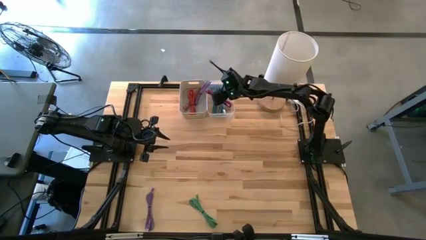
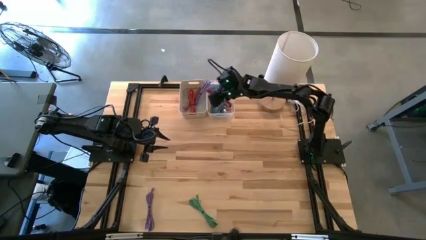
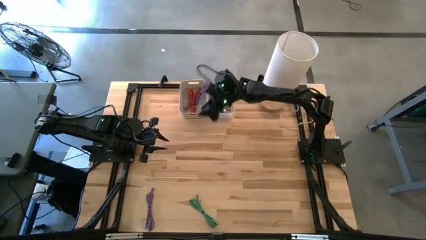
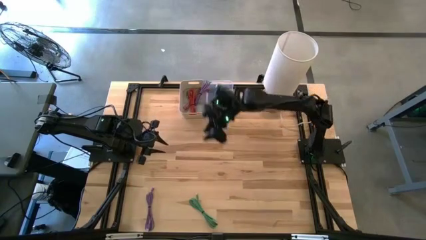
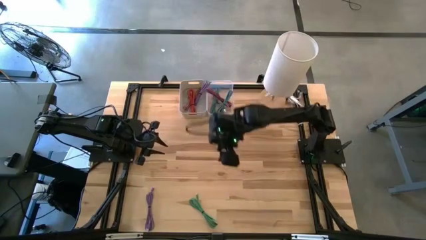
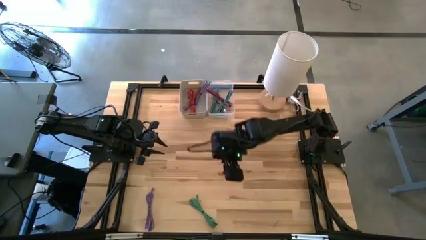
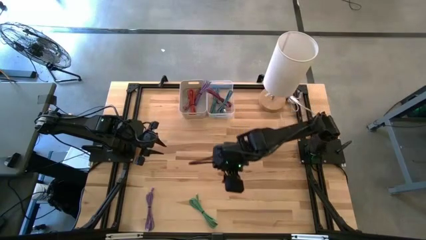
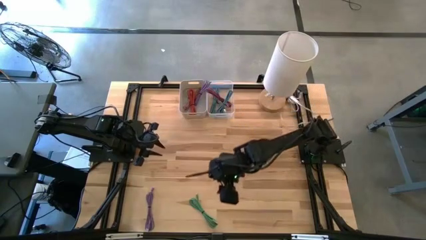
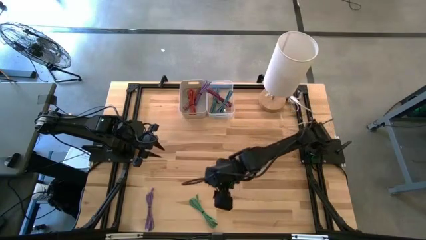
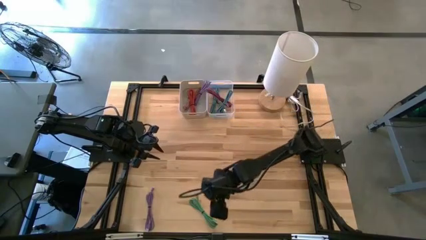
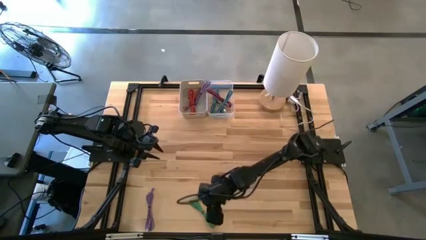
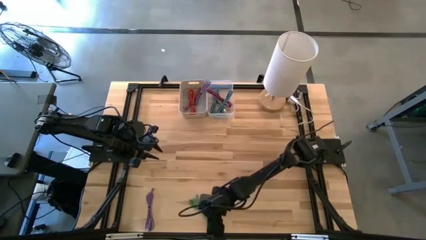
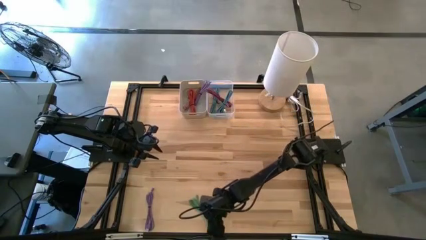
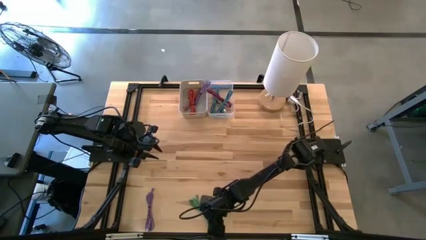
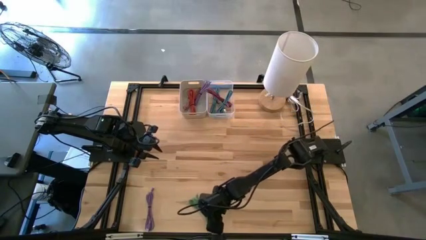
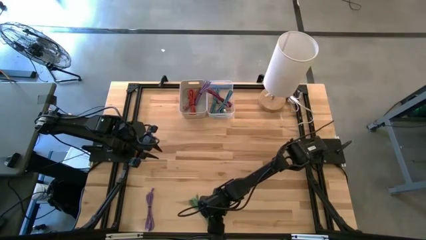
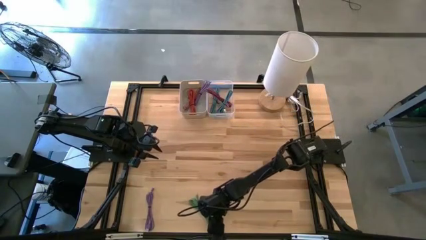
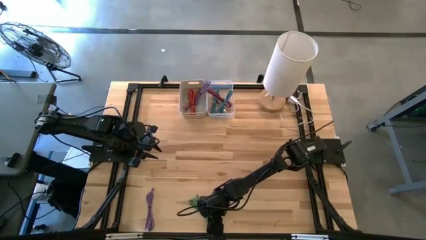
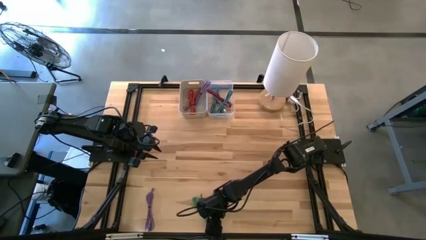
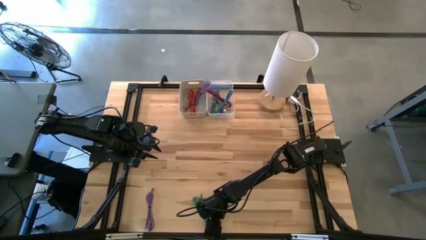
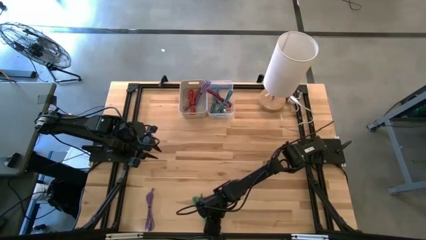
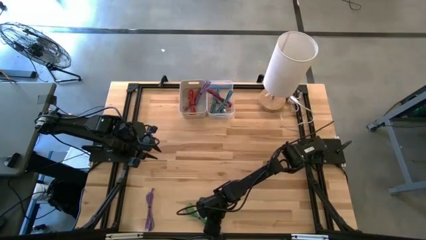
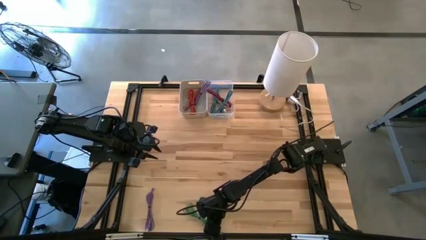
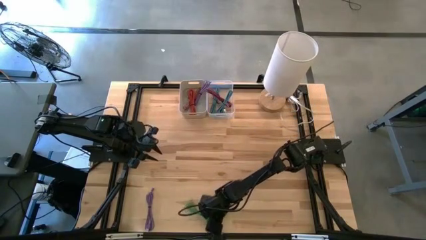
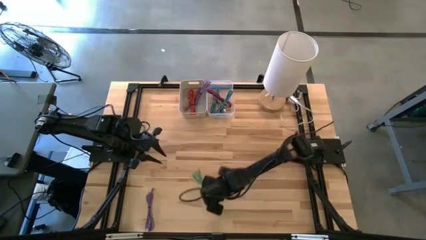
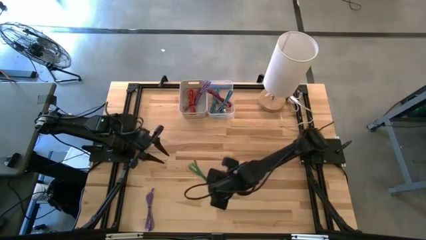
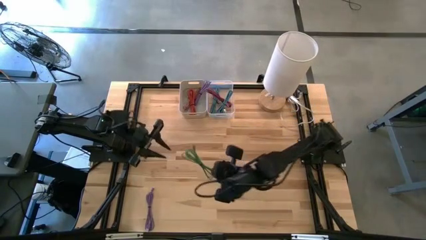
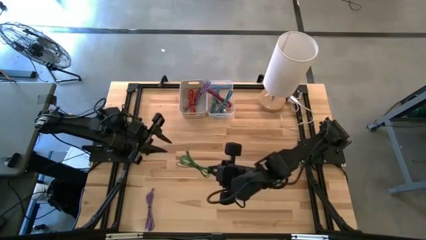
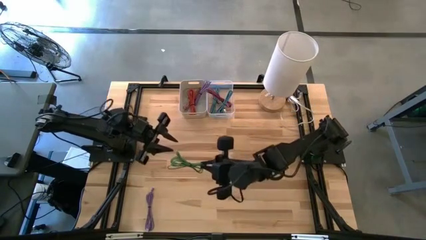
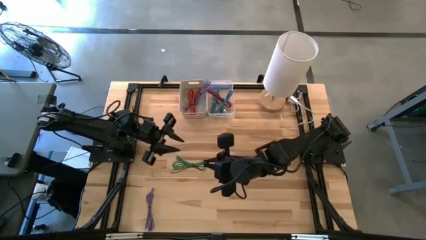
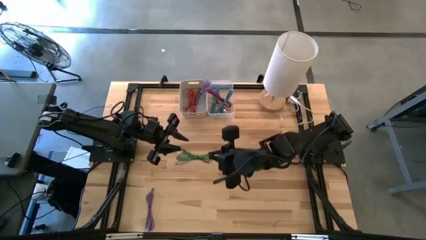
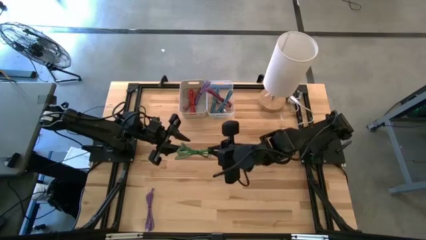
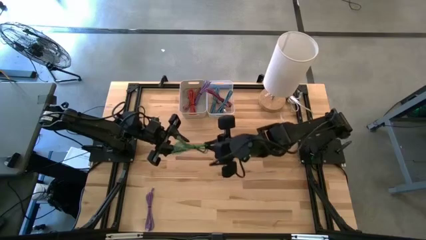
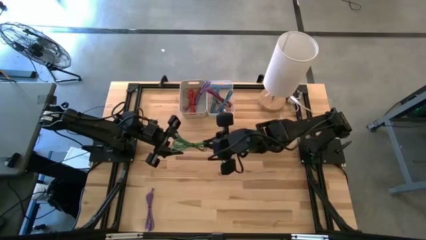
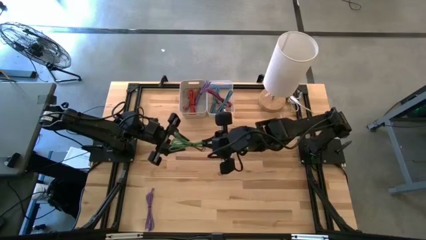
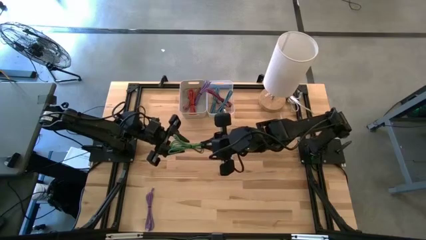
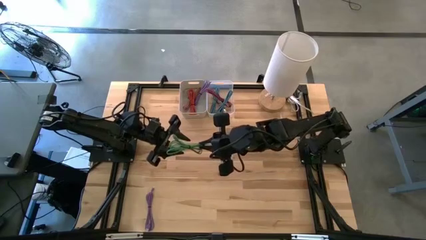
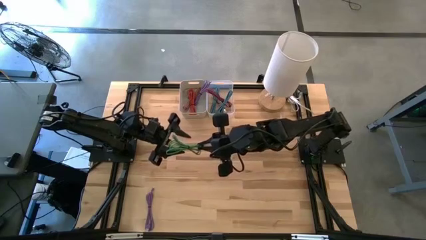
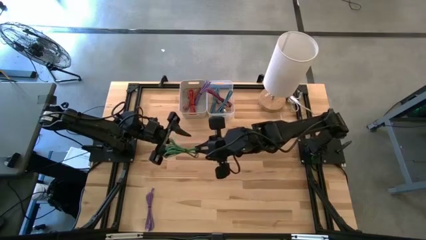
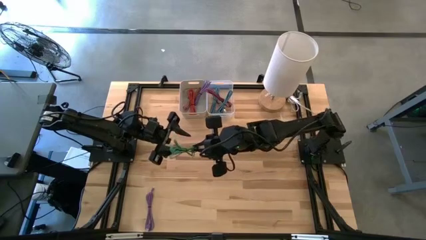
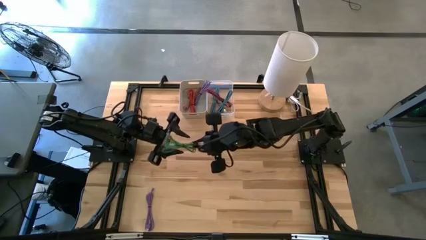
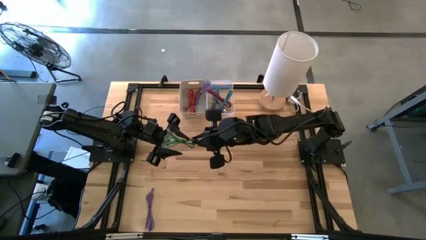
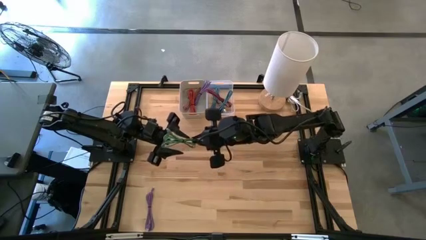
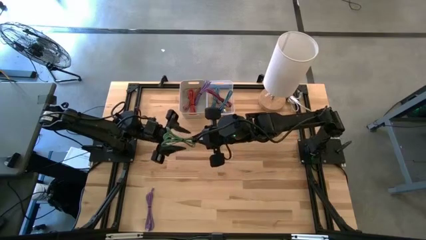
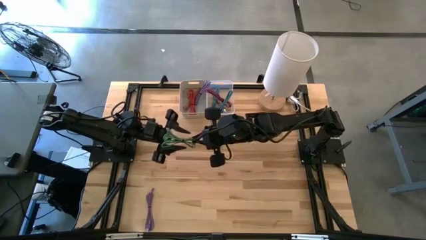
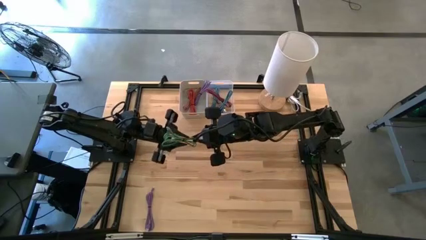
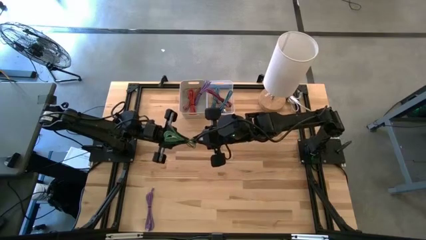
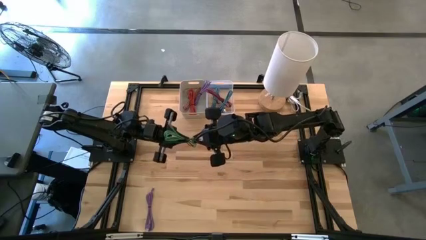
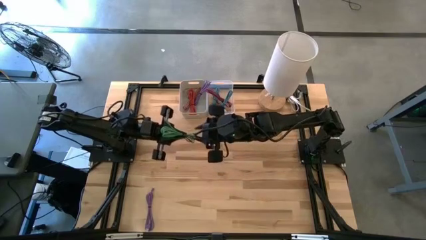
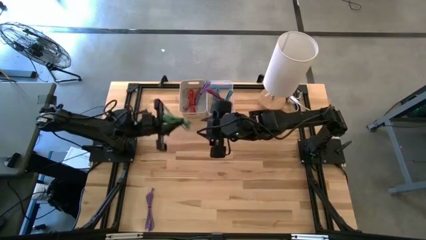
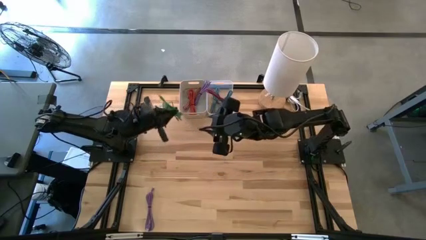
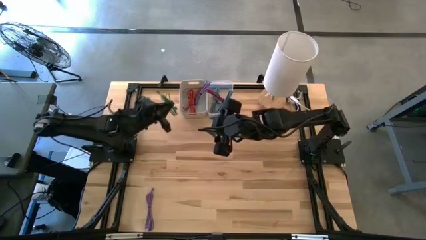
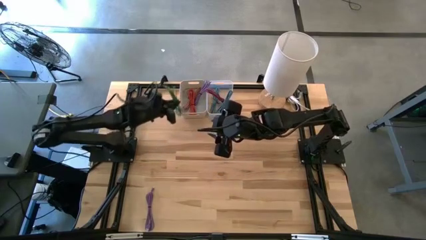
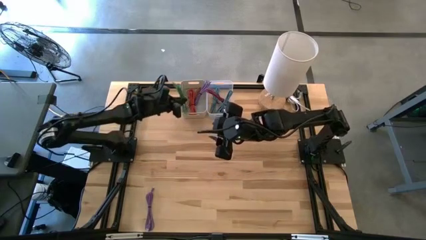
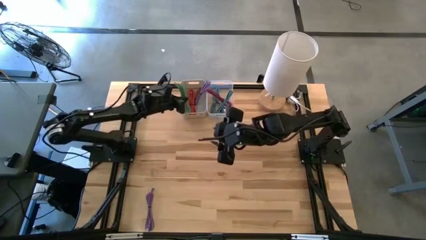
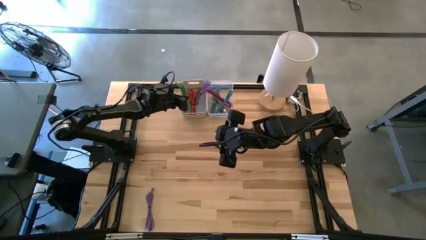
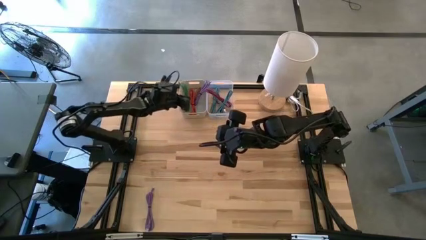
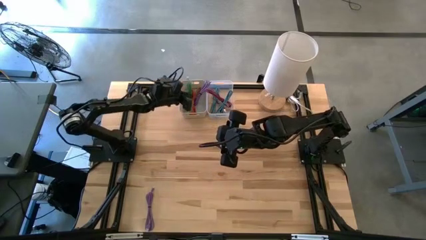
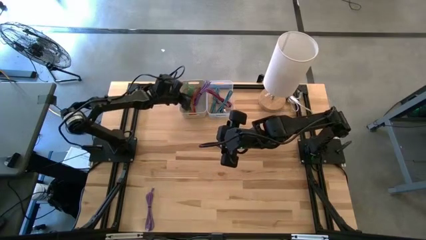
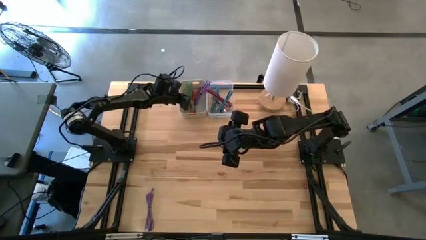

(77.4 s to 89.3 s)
Task: Pick & Place USB Port
Put the green USB cable into the gray bin

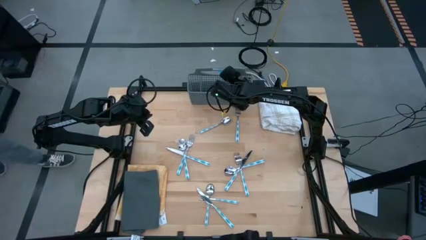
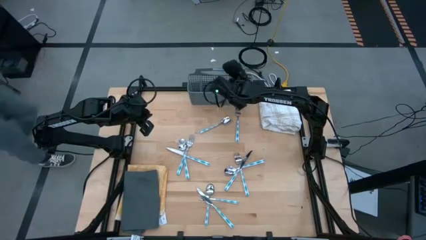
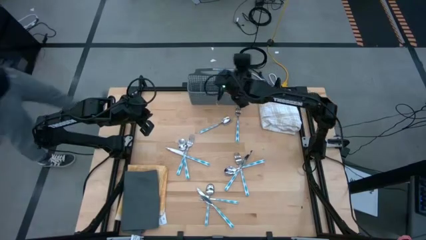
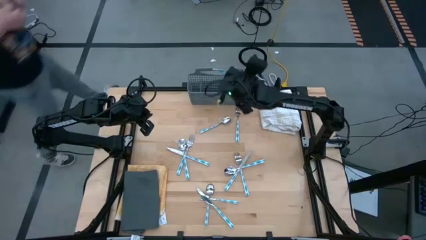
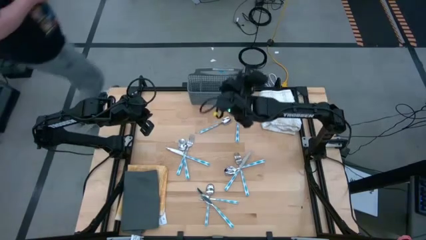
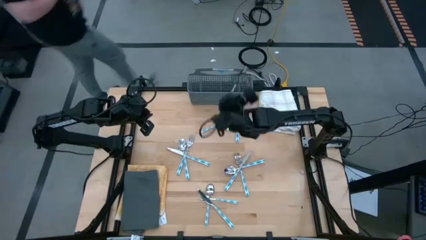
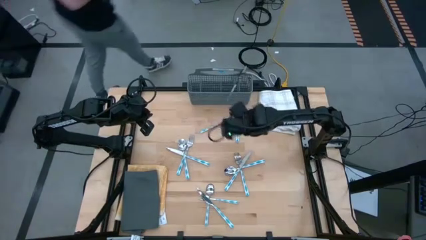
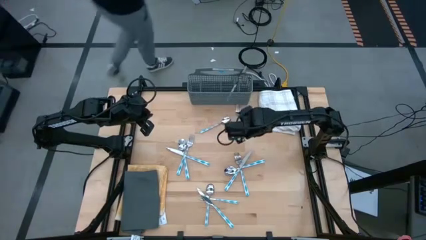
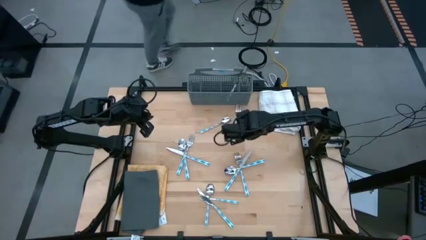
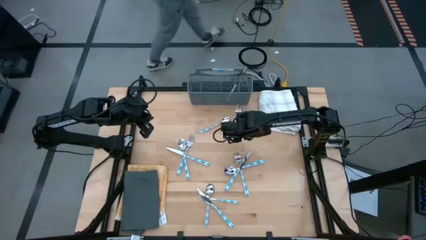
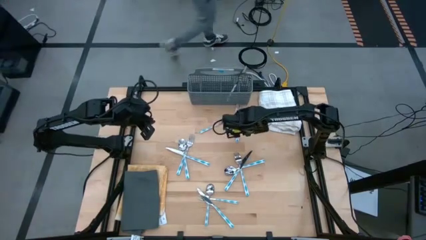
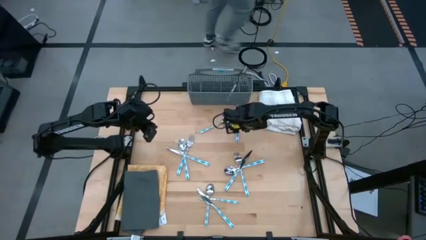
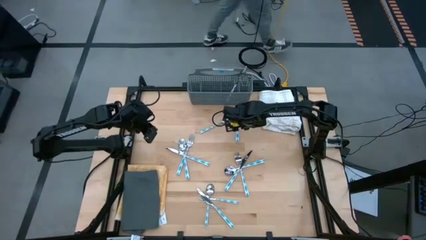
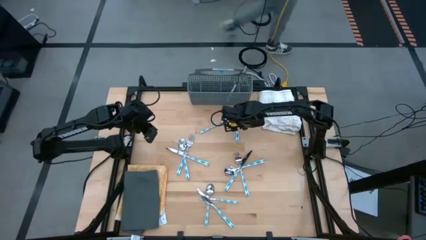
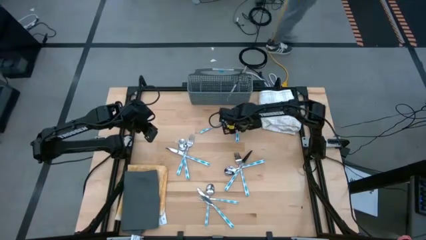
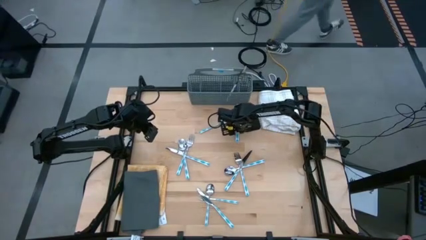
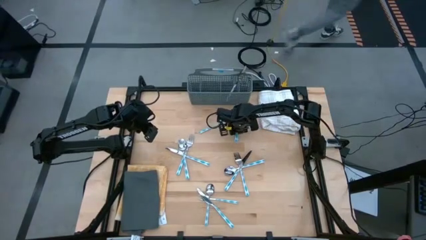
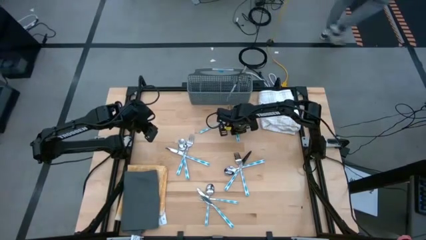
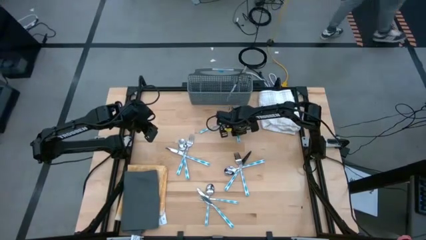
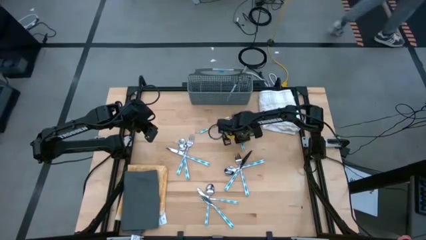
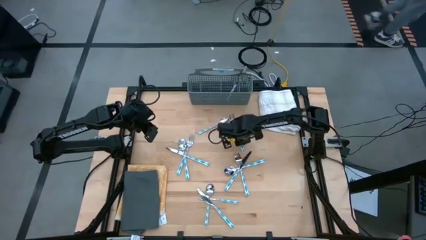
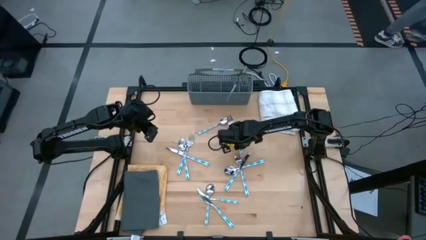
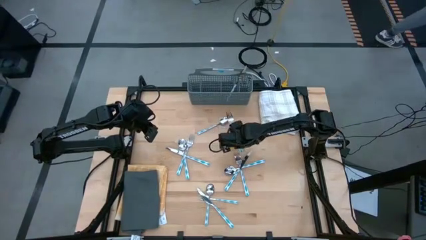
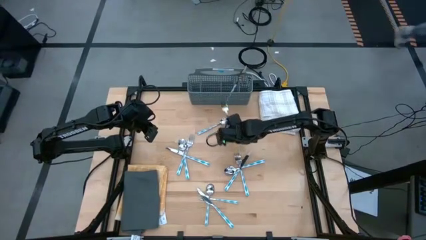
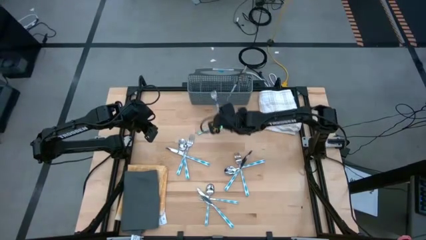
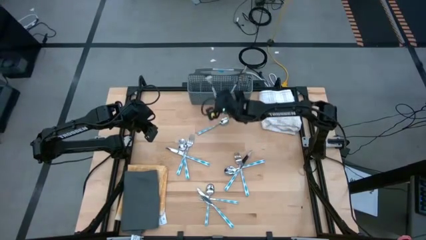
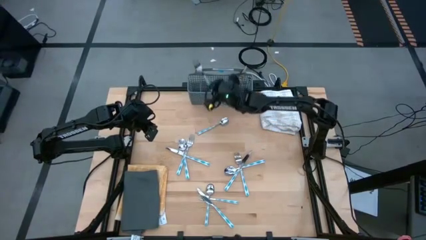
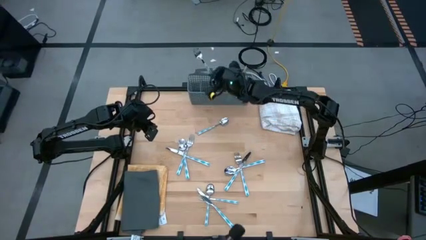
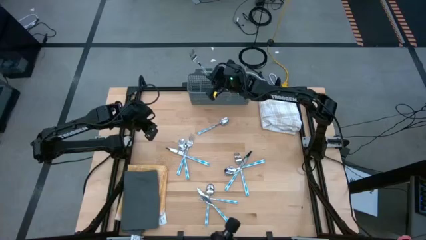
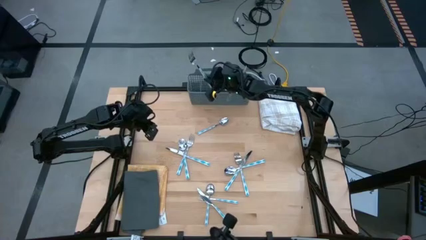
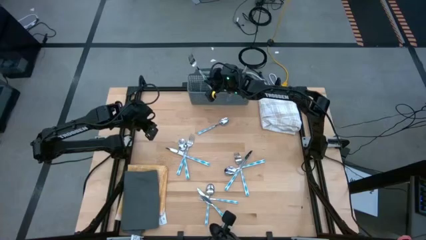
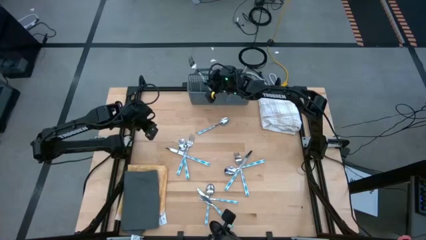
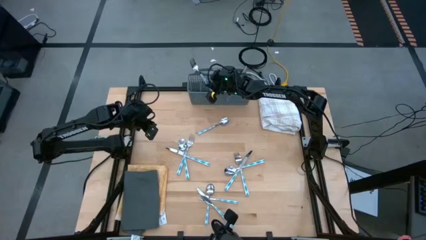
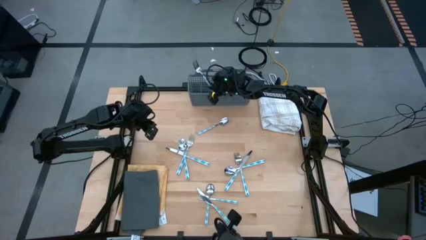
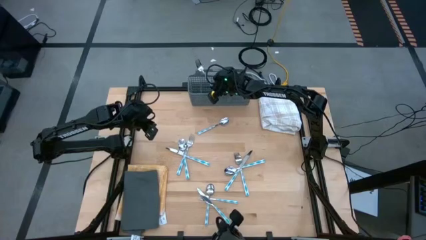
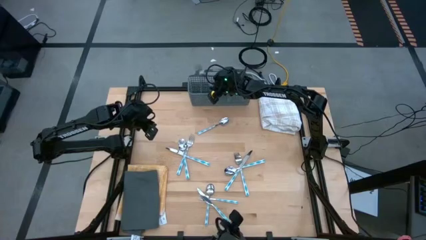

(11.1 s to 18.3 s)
Task: Sort silverware
Put the top blue fork into the gray silverware rack
